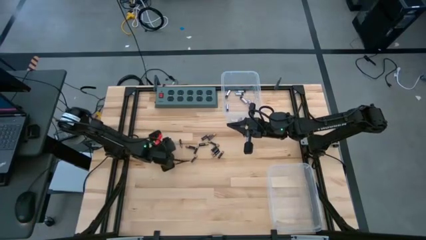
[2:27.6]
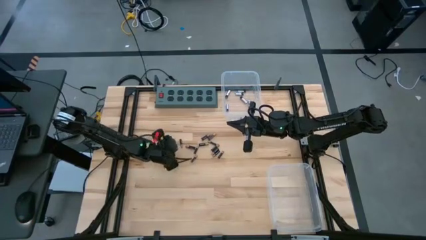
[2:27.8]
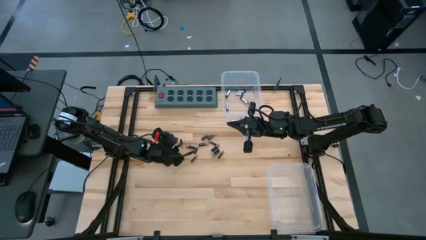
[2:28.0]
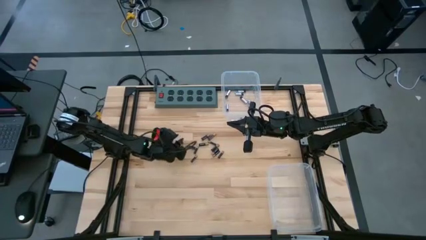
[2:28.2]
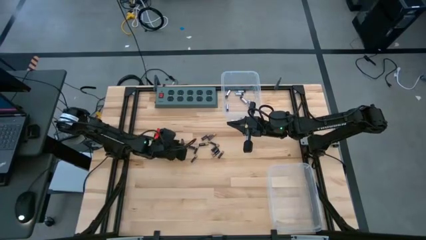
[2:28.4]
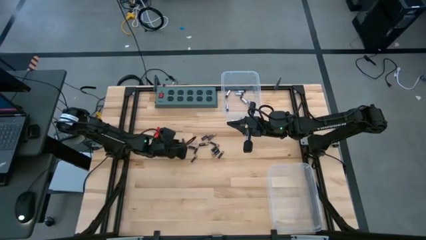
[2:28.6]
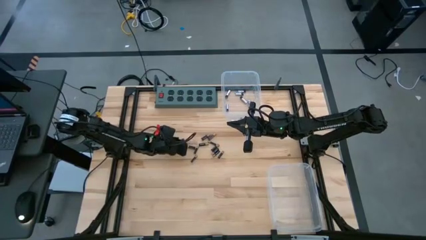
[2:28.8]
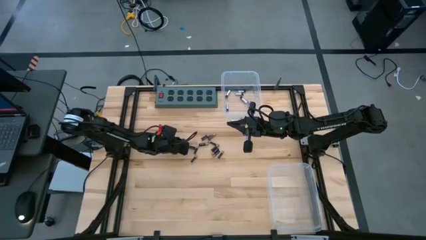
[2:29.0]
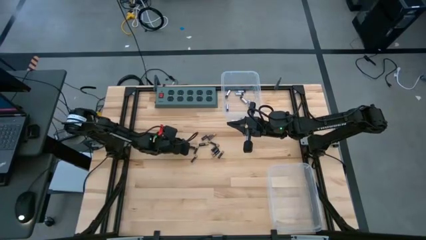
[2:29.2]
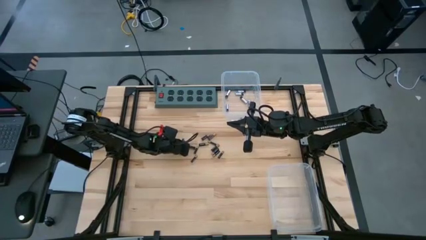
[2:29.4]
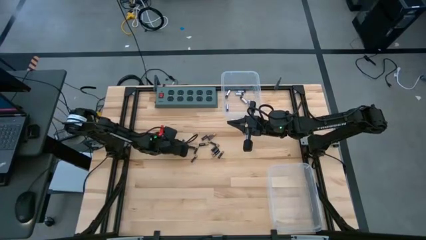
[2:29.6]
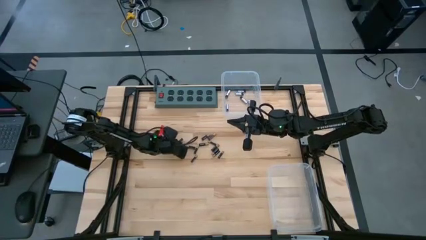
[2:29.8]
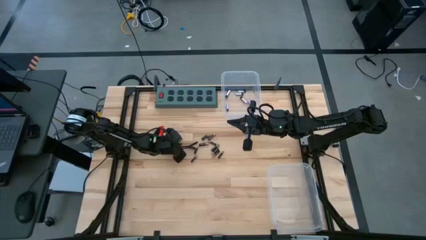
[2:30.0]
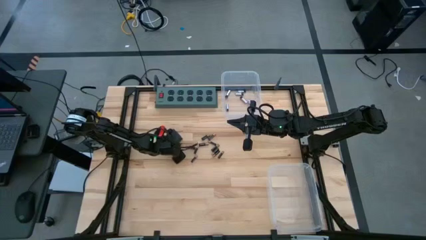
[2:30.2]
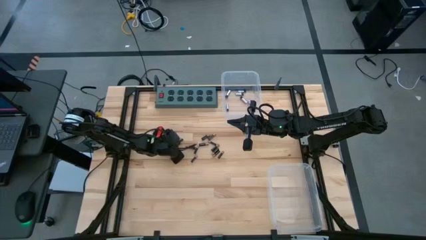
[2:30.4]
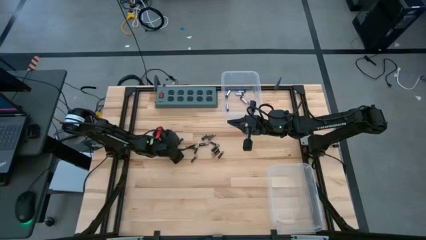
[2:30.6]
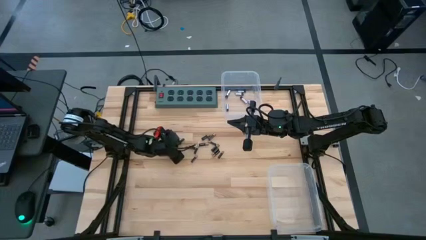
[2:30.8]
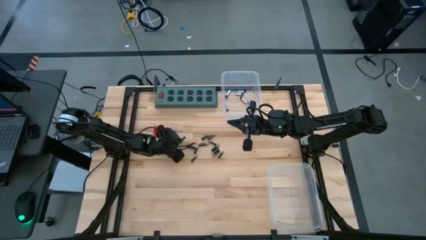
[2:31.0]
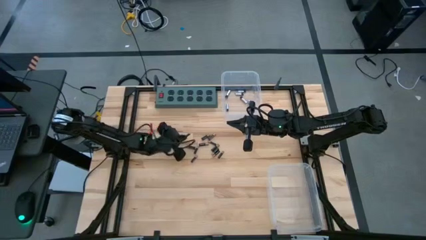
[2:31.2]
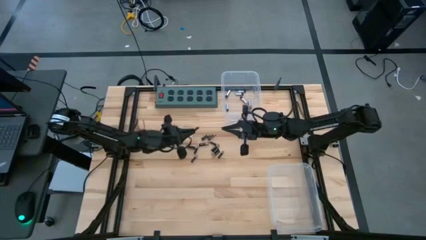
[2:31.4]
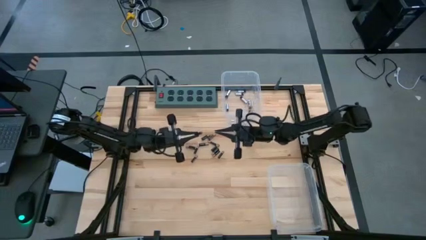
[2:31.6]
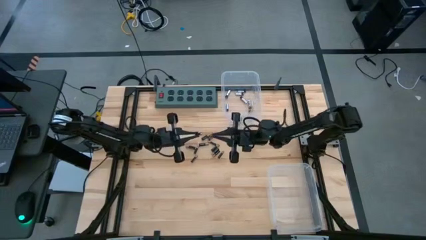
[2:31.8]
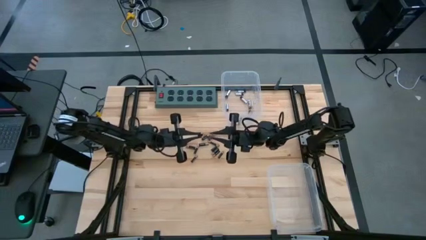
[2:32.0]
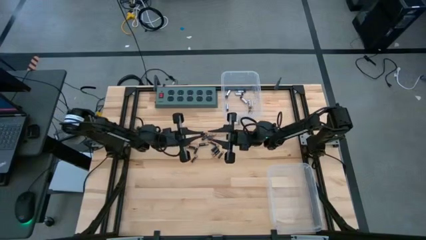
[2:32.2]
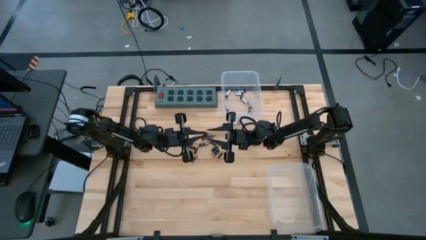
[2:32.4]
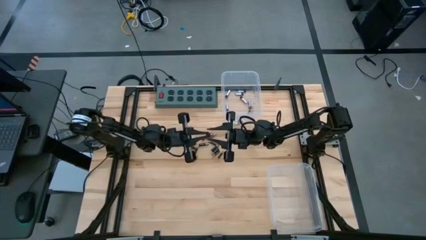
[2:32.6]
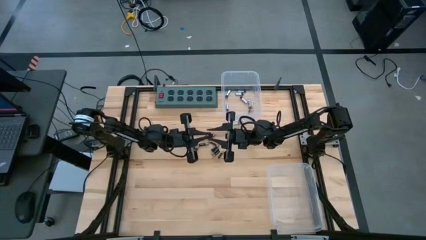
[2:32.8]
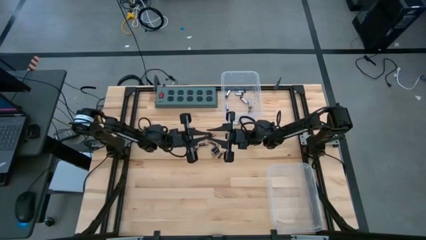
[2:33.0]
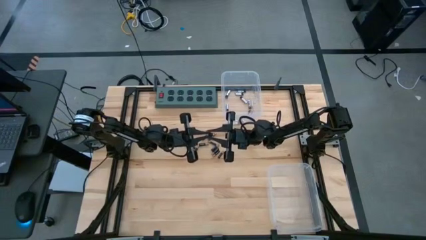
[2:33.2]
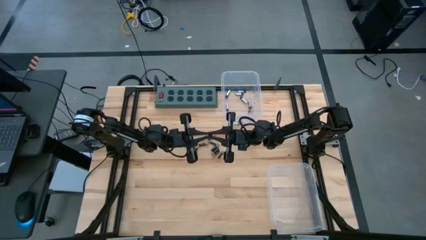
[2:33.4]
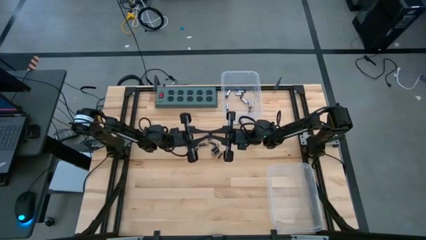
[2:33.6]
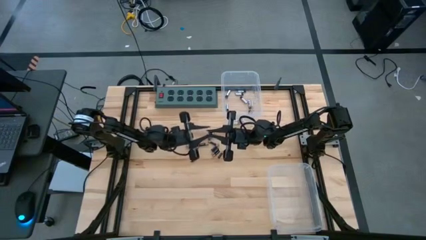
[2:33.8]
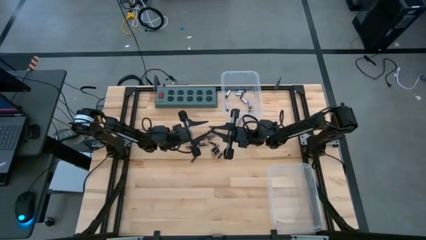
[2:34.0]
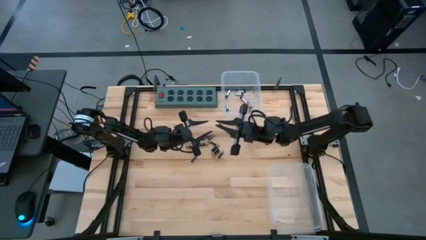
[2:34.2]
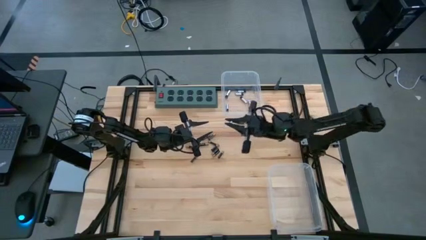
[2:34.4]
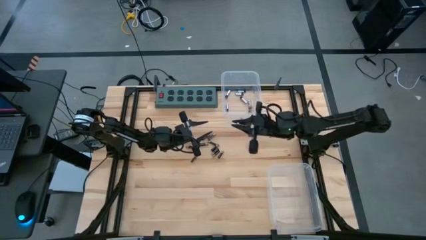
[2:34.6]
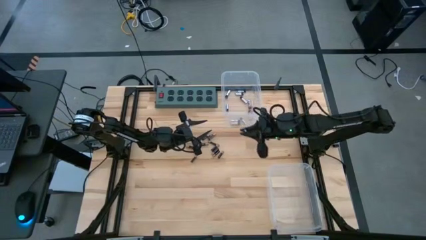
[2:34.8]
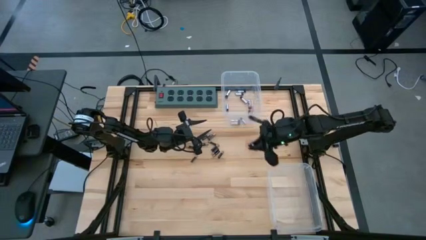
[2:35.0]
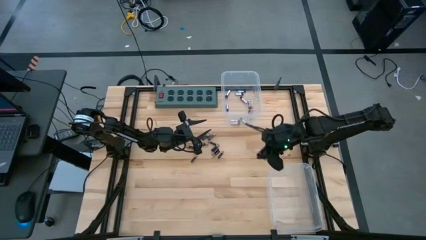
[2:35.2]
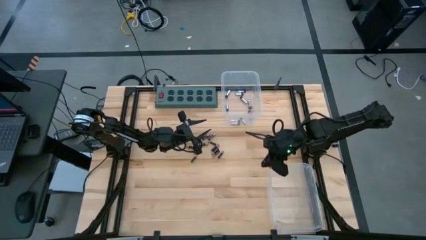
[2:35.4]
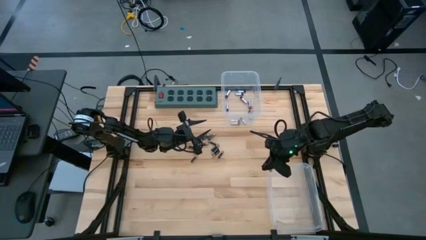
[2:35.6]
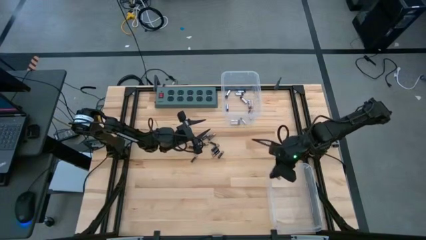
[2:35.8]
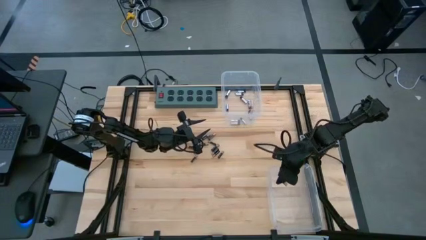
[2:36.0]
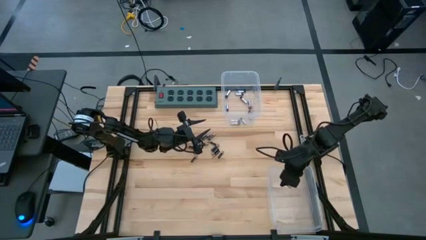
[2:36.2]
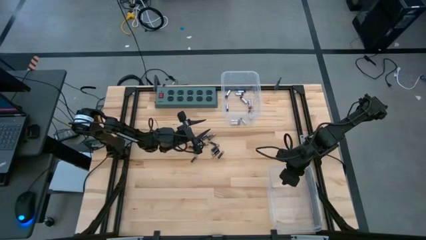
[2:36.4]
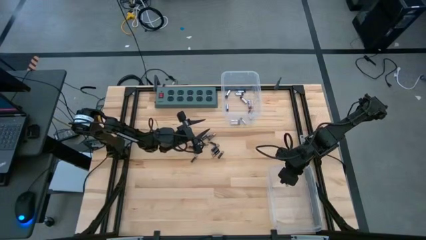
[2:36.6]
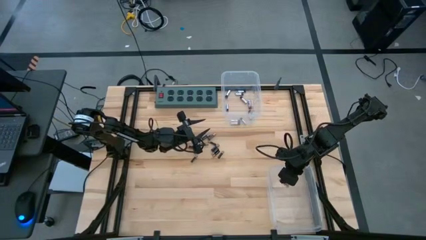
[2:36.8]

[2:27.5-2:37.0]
Task: Sort batteries
Put the black battery into the bottom transparent bin

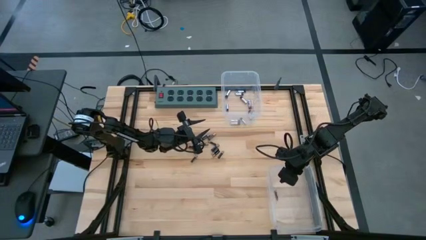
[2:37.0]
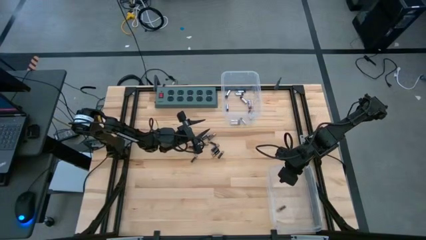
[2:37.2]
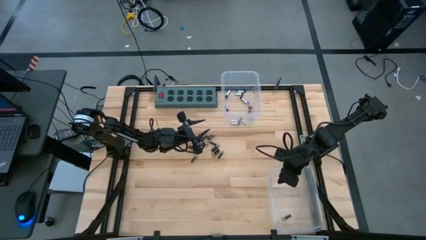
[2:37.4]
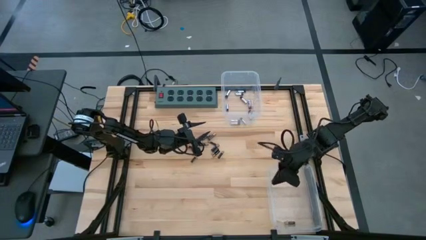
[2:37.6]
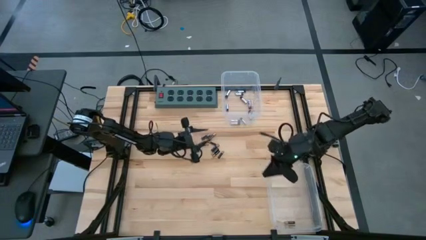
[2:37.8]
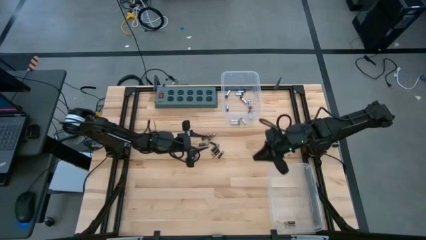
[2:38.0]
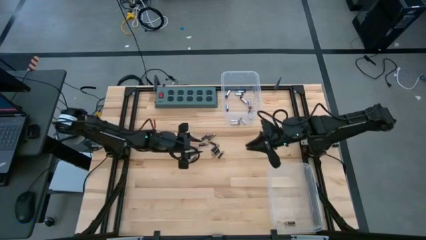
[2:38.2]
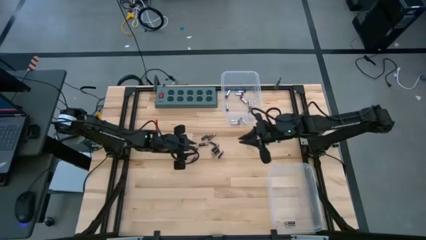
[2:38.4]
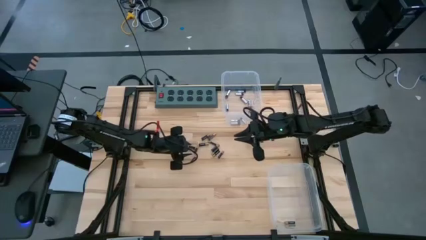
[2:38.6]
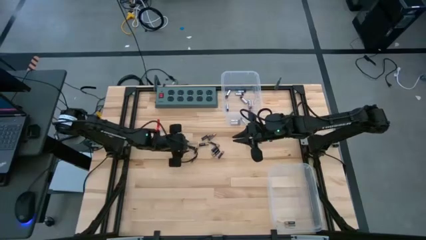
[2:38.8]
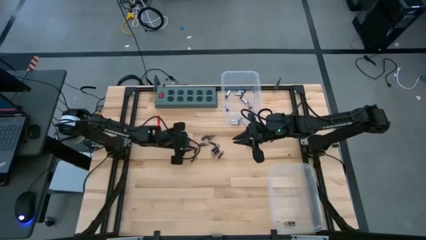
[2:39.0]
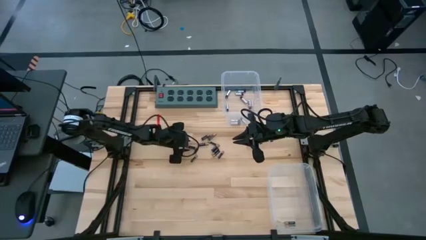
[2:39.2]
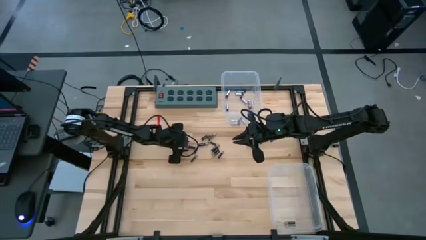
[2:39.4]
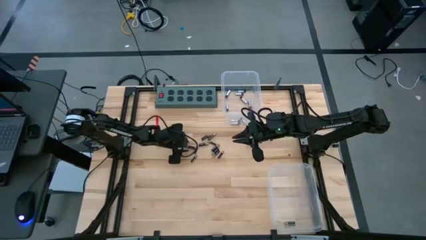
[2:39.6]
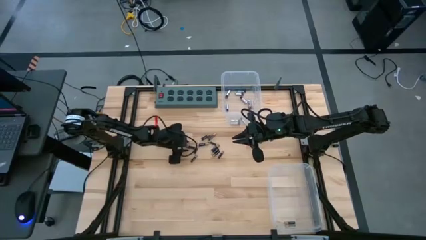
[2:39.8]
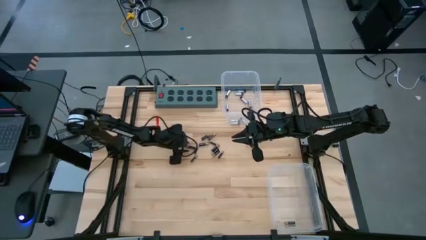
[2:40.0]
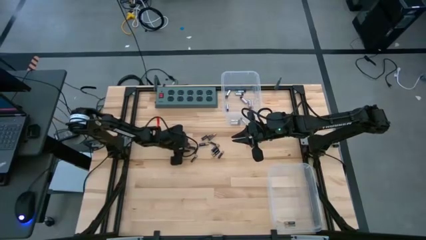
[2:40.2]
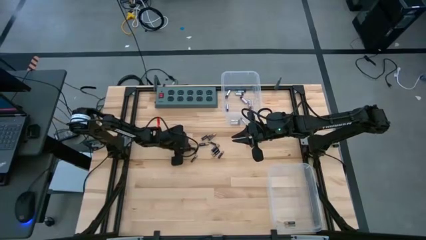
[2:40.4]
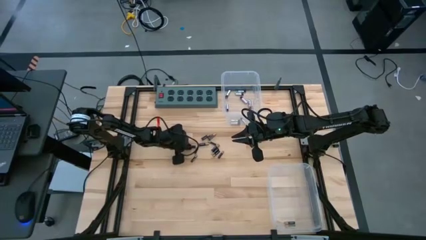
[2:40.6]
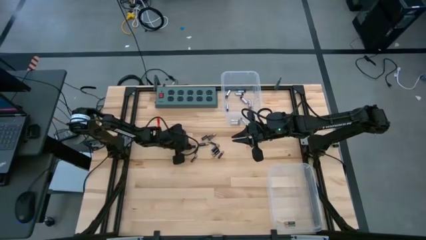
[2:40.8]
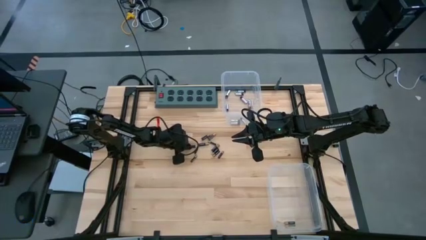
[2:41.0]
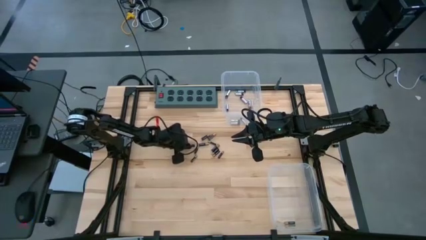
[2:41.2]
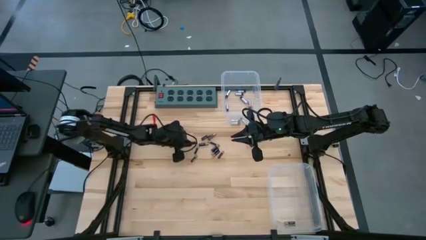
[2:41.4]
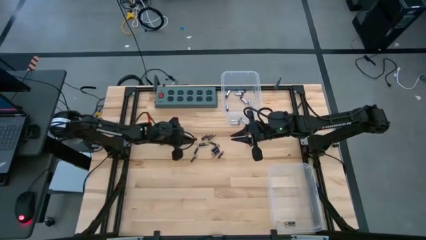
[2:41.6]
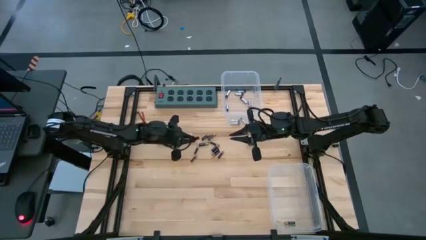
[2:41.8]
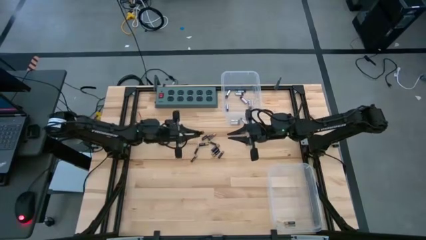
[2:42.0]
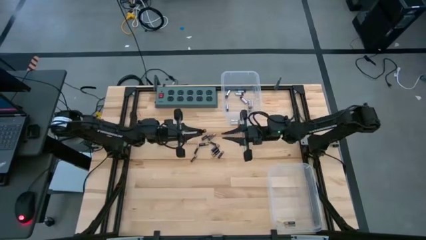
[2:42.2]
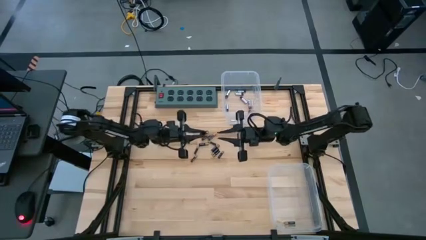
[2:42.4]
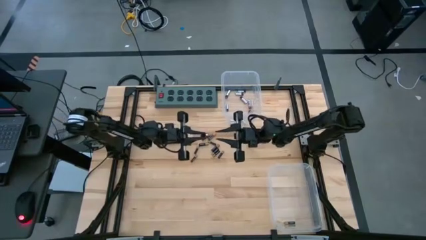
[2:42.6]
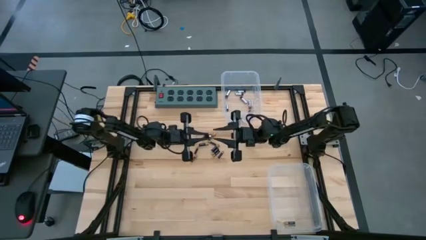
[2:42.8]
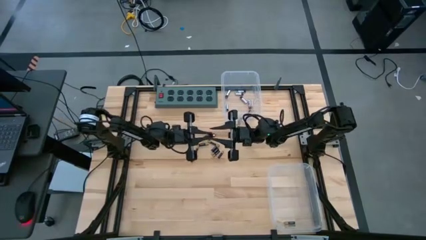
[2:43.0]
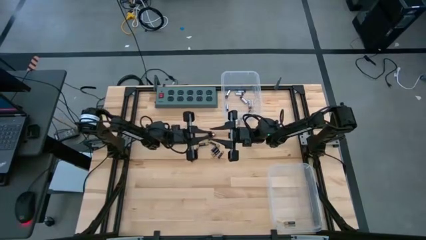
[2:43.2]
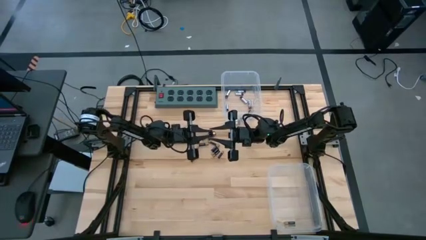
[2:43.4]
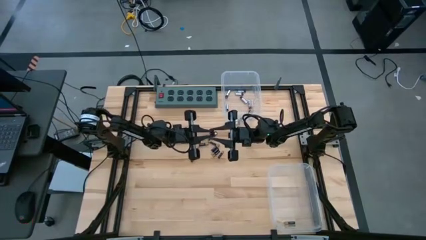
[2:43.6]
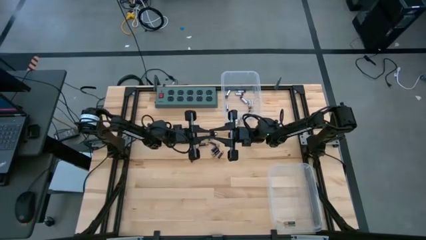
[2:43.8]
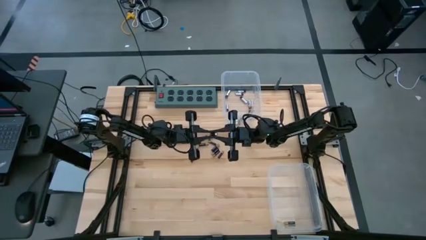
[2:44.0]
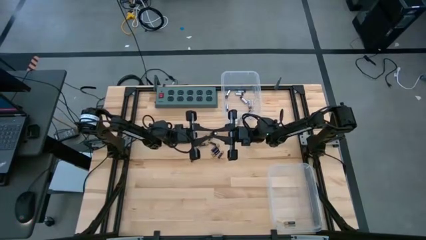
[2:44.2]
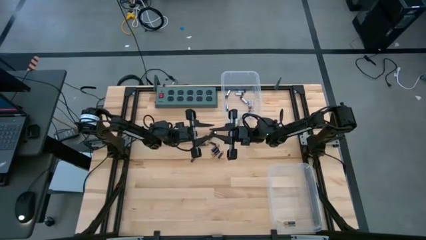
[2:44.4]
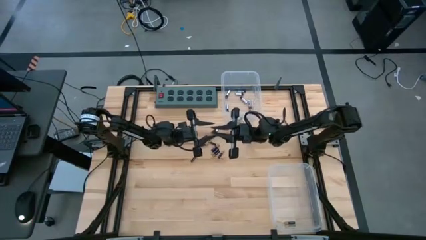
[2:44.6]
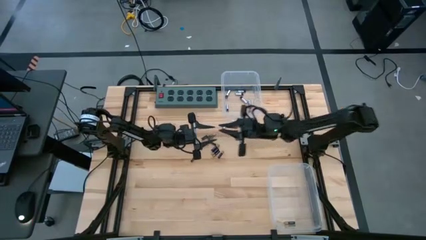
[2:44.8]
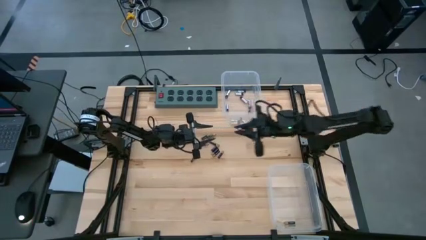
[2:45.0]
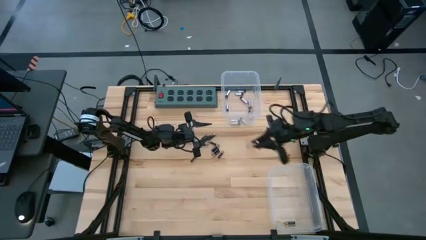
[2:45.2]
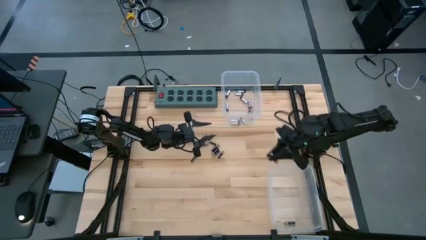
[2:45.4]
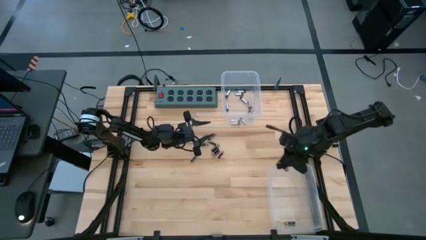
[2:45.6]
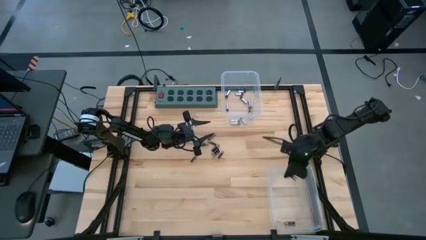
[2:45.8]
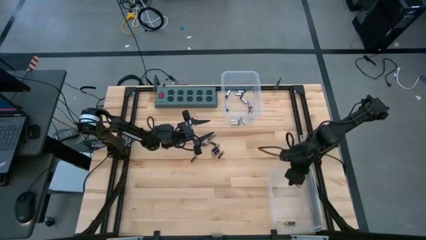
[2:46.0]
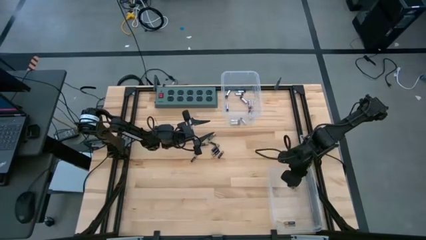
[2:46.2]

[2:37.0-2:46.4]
Put the black battery into the bottom transparent bin
